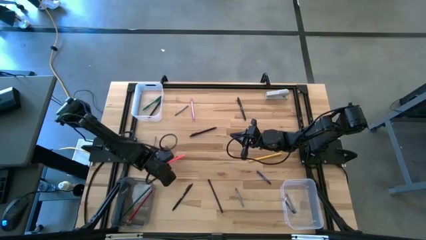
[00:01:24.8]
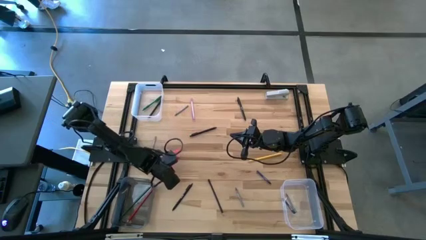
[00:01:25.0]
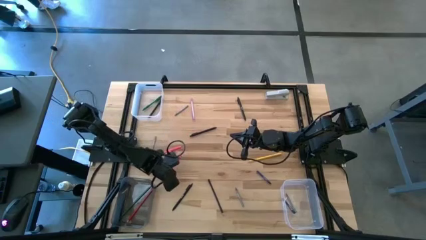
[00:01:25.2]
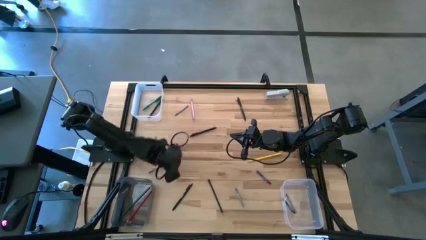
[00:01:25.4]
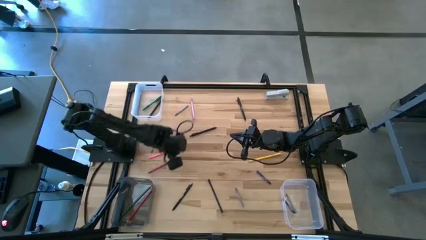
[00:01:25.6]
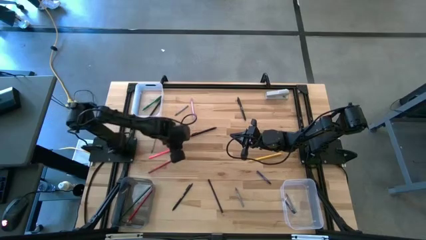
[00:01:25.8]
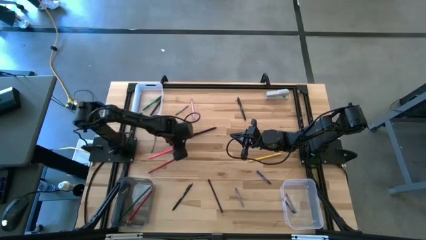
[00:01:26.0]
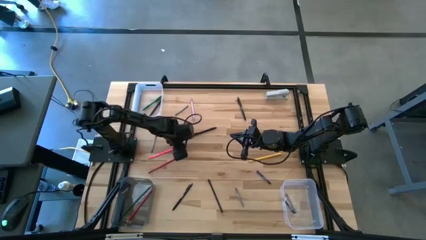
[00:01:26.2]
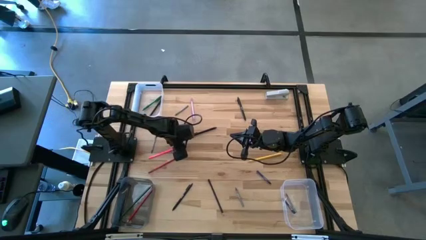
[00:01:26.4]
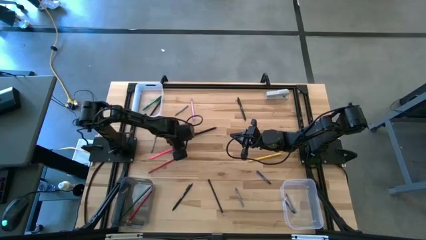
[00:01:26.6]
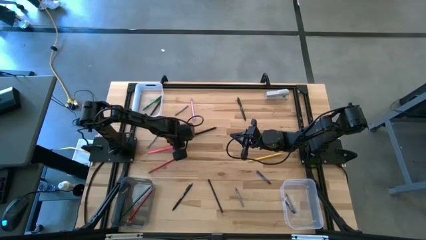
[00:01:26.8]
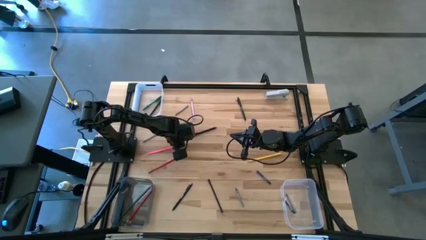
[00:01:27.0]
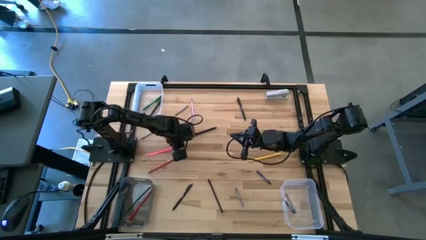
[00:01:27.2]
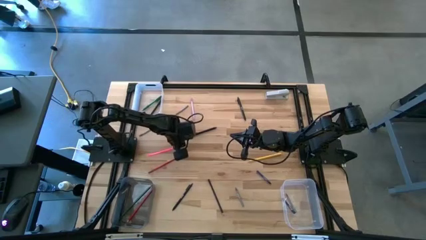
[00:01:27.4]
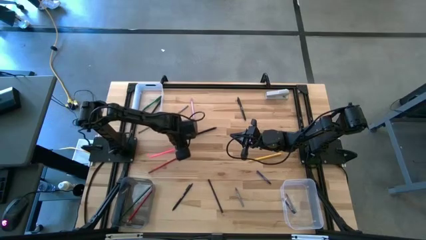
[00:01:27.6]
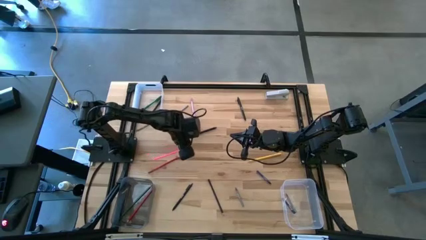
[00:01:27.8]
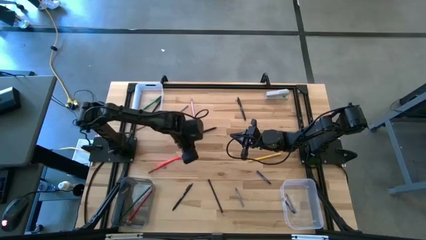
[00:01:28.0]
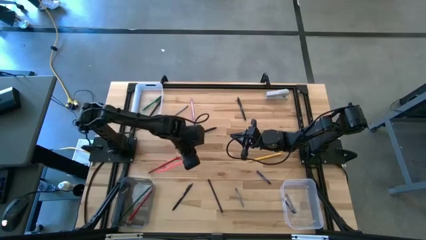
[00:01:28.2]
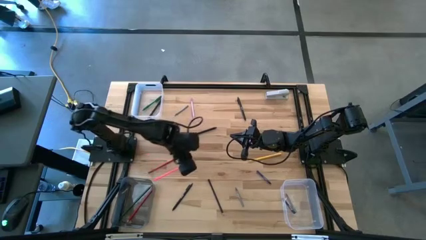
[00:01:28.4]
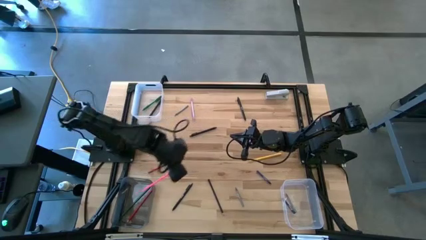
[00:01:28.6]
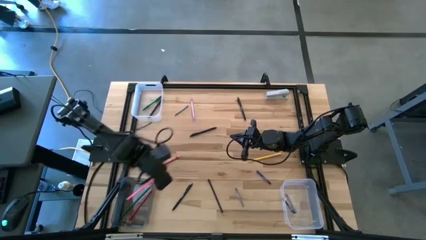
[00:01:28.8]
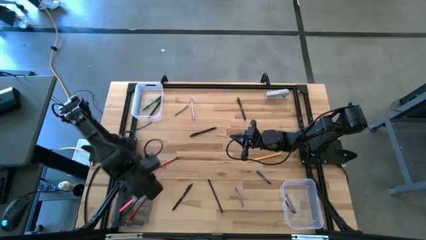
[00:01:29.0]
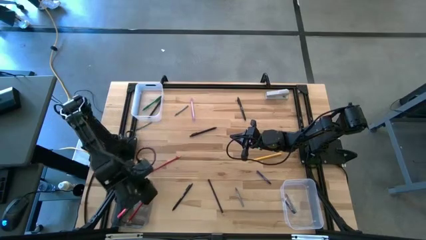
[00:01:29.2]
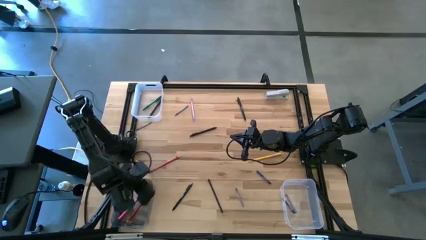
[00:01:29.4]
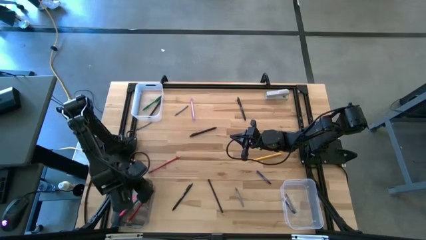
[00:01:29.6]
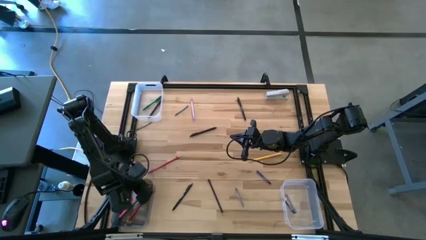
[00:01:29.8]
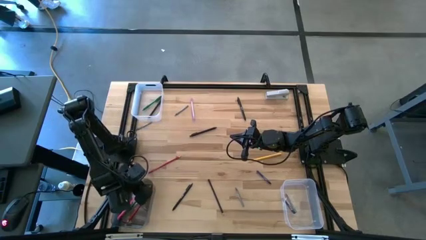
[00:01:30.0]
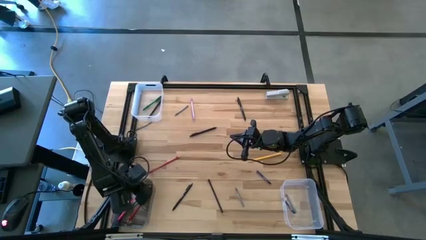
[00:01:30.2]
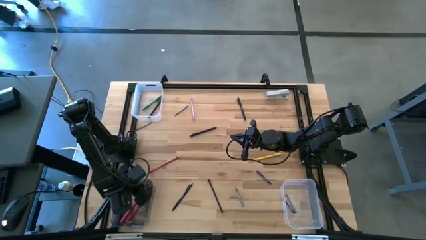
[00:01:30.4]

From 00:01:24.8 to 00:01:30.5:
Task: Sort crayons/erasers/pens/pencils in bins
Put the pink pencil into the black bin

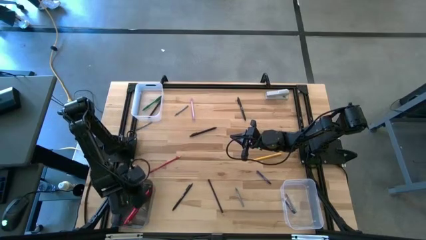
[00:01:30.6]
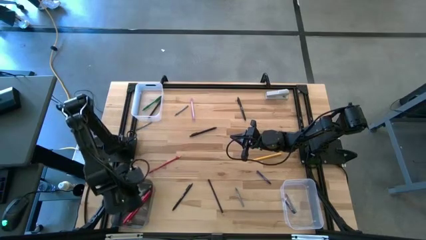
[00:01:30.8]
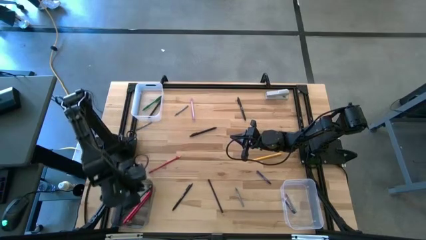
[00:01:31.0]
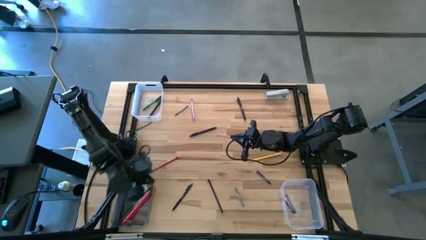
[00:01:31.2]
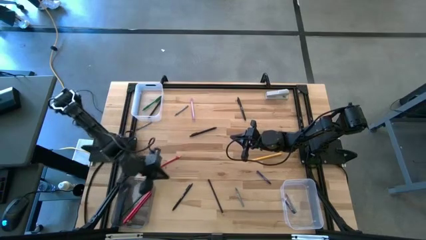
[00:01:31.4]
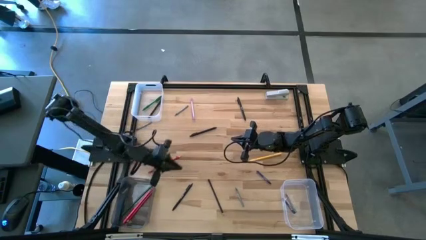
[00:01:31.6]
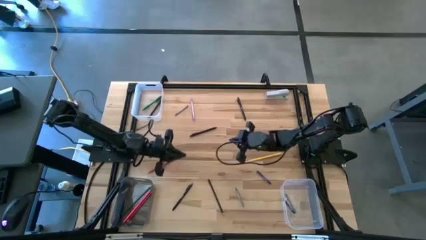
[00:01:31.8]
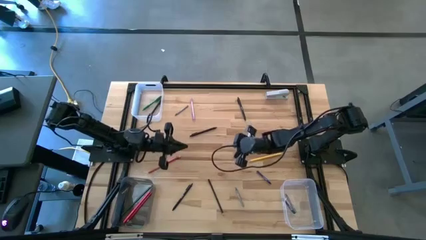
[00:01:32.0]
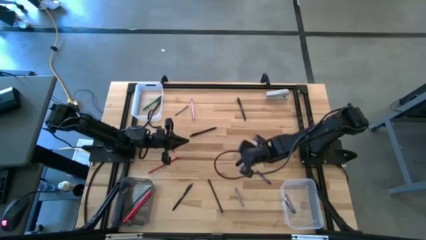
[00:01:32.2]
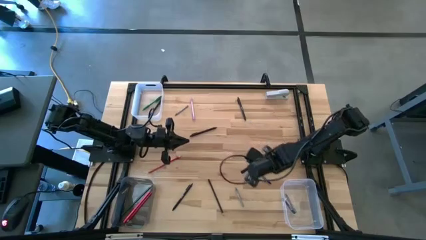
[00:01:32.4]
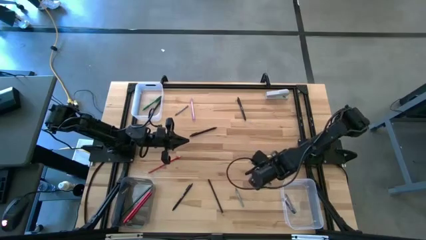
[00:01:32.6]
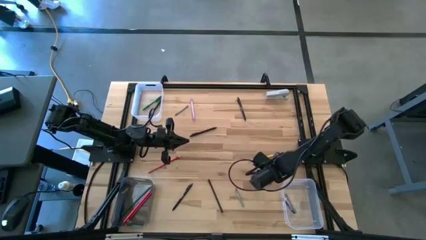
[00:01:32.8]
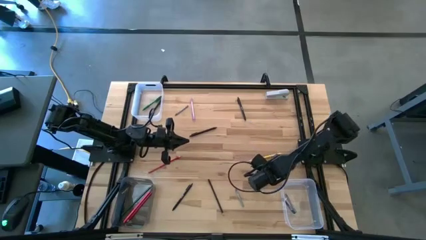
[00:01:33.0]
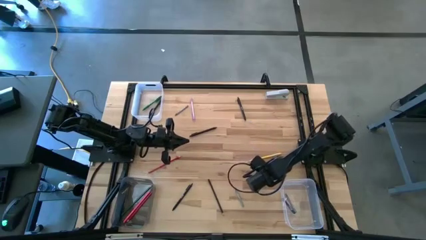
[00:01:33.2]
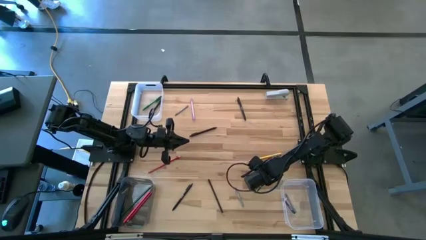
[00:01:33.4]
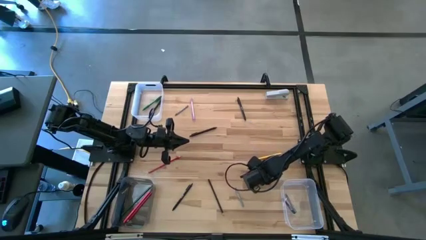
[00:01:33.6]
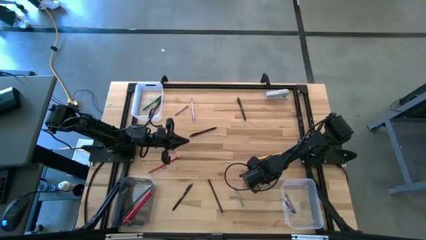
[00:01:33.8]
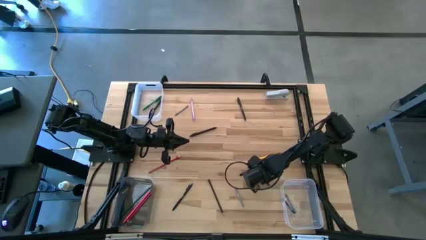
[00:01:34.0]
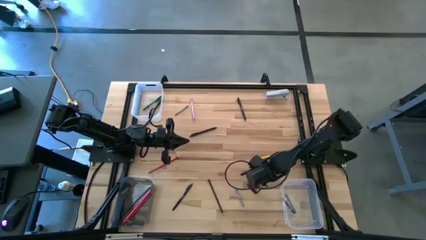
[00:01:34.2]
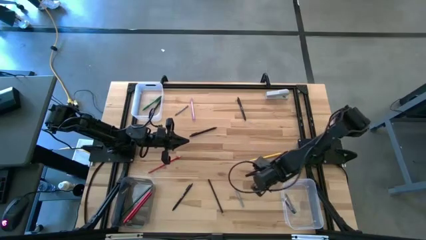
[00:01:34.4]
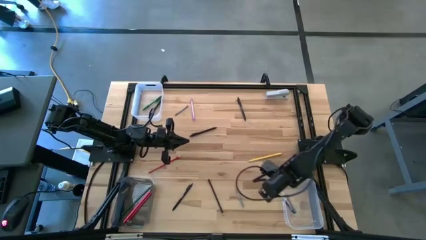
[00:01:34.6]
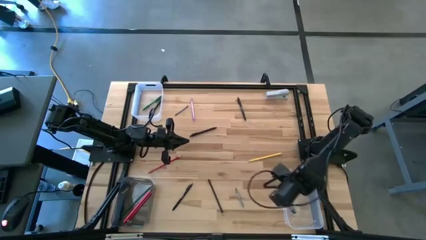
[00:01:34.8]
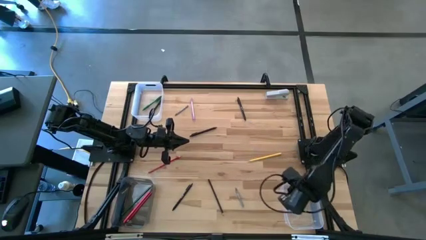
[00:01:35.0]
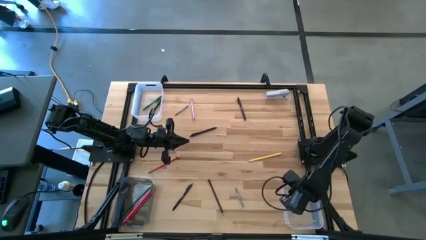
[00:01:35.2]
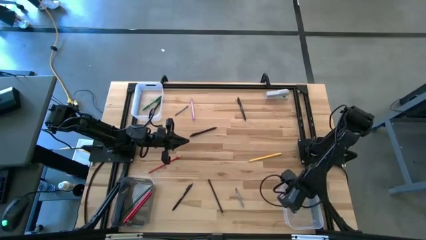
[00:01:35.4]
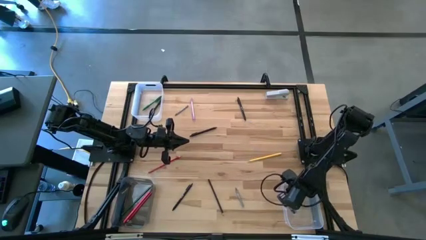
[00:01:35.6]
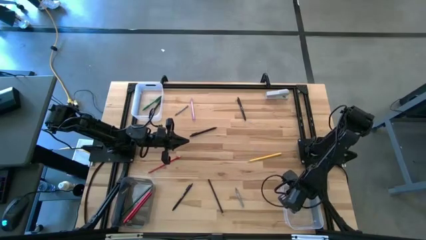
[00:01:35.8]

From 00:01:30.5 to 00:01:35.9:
Put the blue crayon into the bottom transparent bin

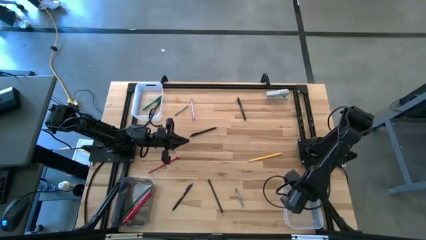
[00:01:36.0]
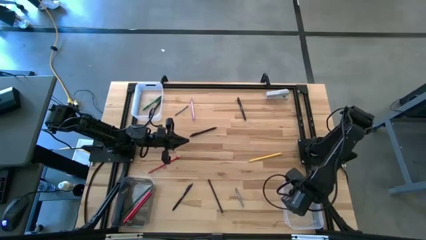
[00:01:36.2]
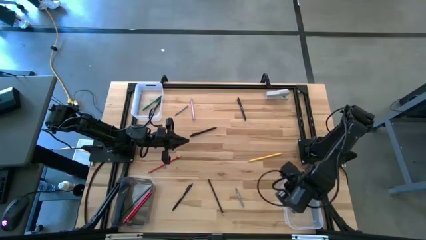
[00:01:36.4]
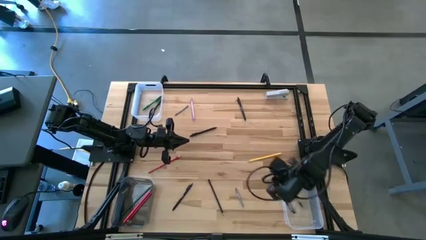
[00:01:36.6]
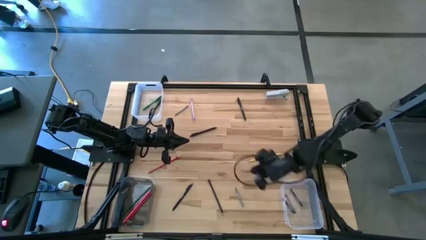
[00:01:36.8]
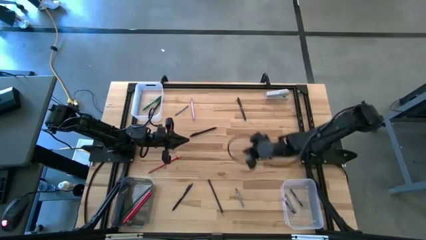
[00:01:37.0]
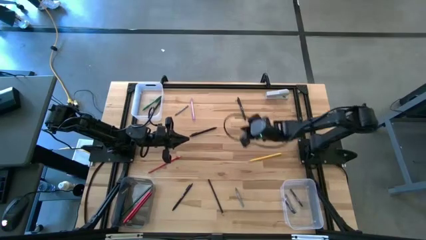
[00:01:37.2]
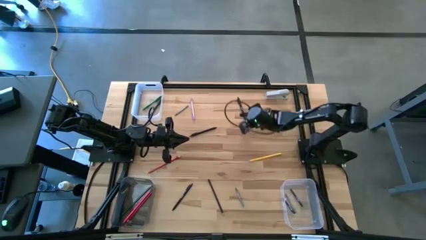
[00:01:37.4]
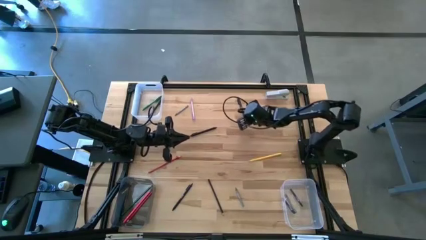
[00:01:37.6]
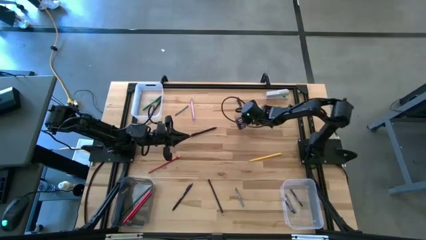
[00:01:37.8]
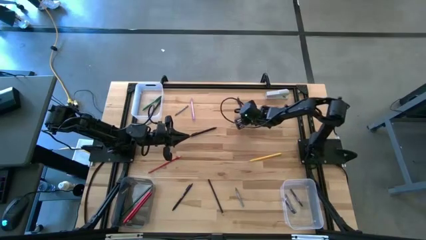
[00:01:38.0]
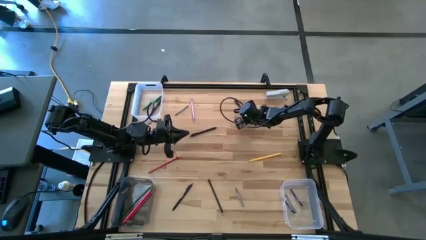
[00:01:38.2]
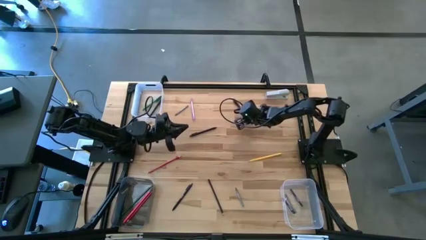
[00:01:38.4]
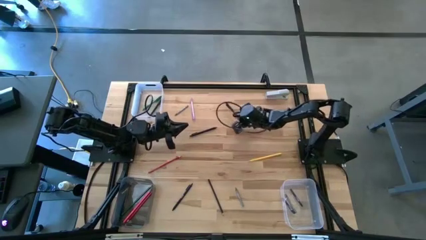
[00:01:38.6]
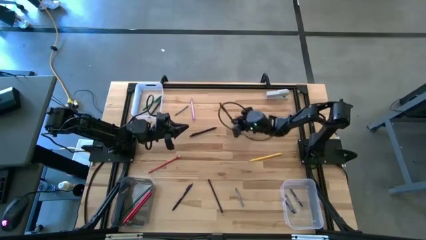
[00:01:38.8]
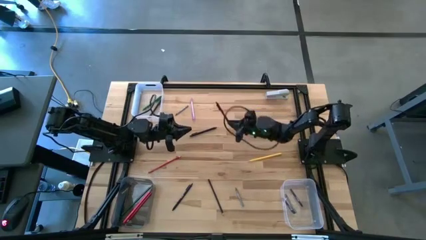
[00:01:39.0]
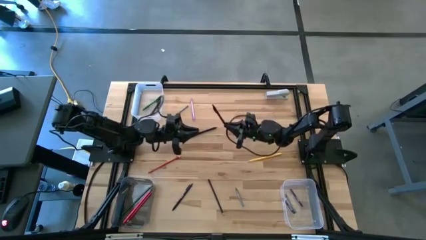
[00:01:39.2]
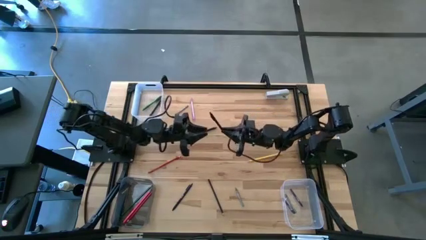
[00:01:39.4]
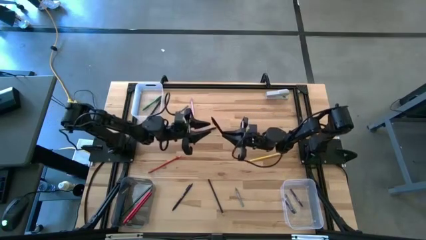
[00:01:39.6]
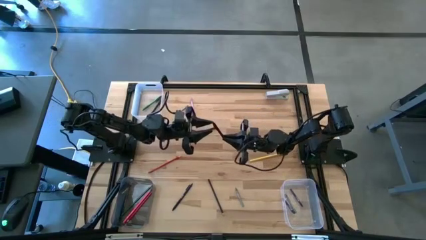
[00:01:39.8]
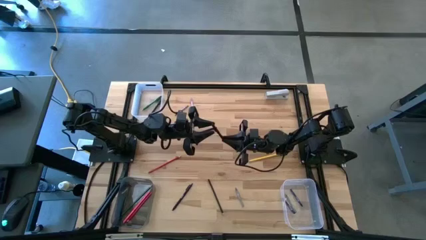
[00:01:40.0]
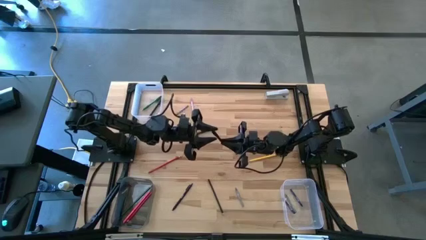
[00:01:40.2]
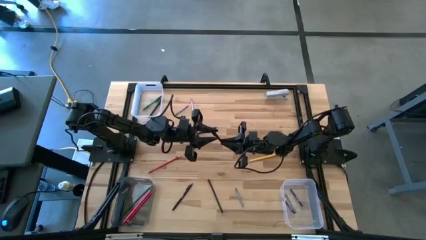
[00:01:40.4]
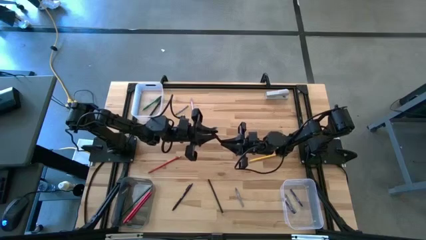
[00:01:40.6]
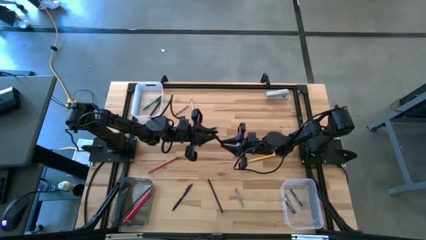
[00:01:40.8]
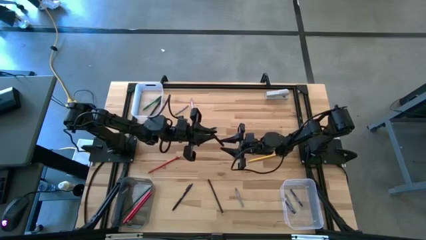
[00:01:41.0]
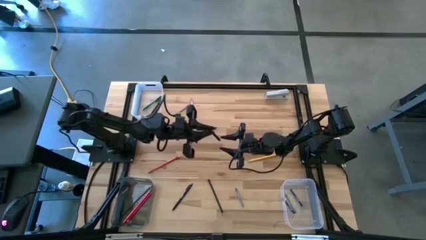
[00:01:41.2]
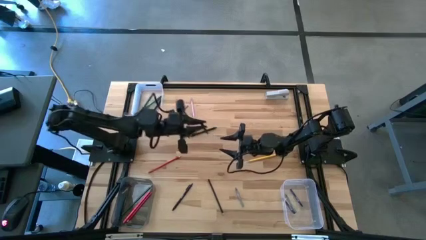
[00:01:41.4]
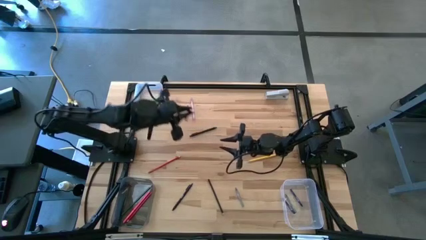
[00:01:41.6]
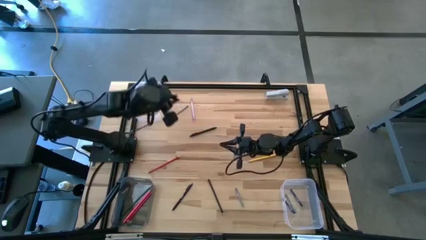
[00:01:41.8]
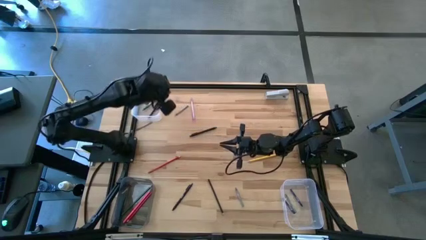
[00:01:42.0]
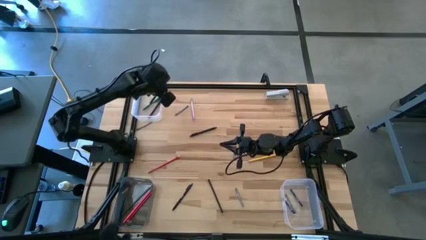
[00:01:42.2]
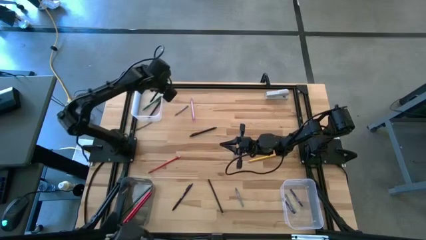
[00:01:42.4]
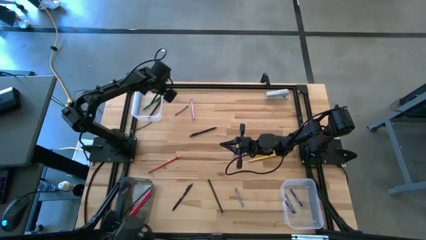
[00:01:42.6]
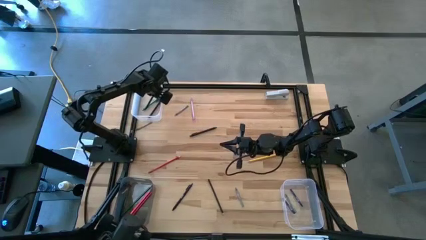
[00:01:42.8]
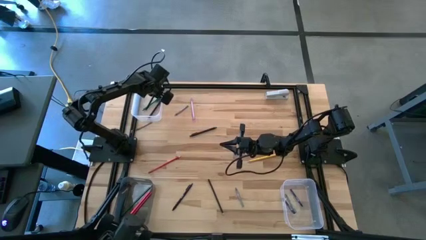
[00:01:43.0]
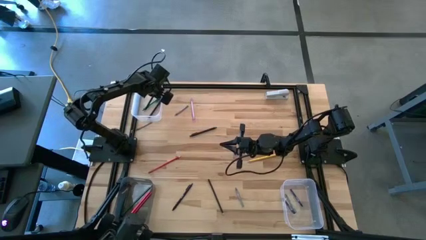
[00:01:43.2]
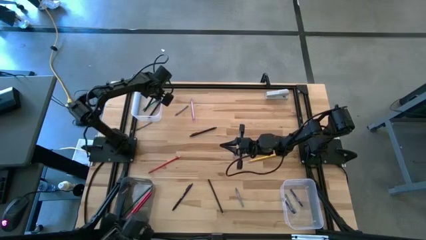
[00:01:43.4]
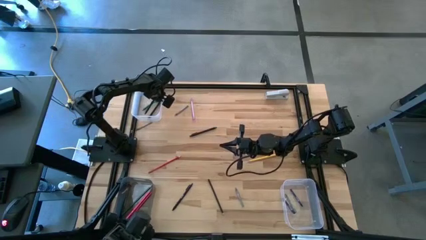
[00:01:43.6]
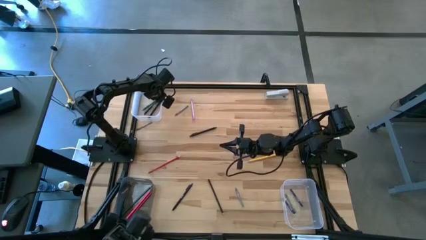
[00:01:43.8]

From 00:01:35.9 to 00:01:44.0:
Put the top black pen into the top transparent bin
